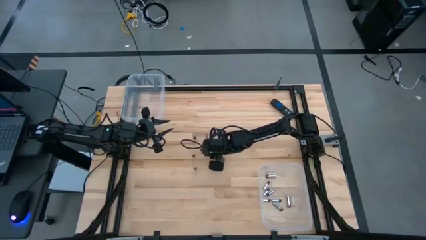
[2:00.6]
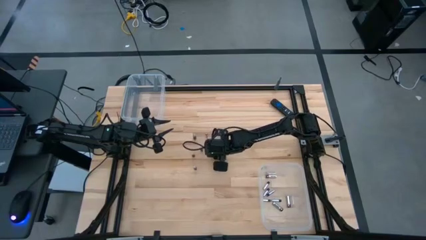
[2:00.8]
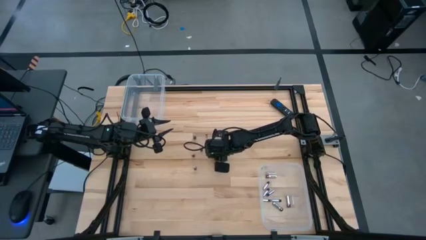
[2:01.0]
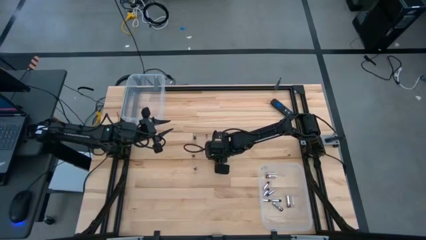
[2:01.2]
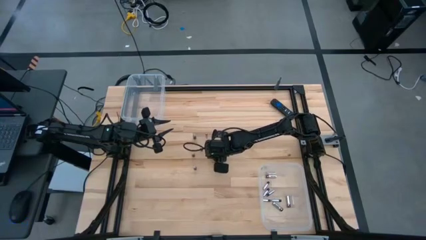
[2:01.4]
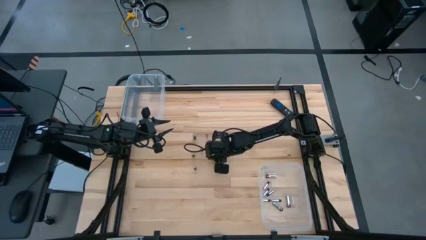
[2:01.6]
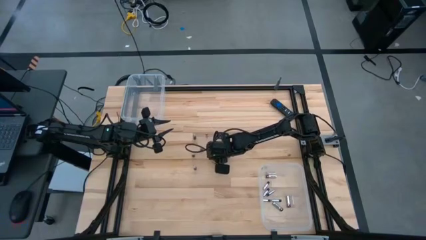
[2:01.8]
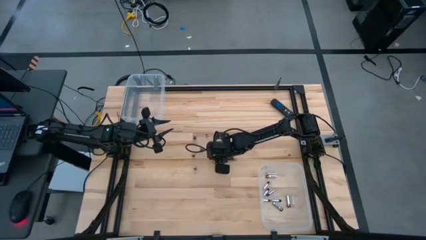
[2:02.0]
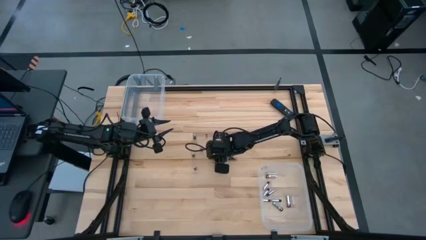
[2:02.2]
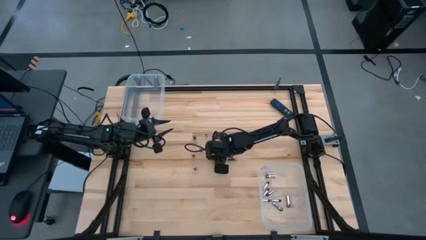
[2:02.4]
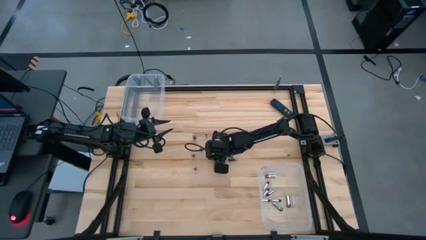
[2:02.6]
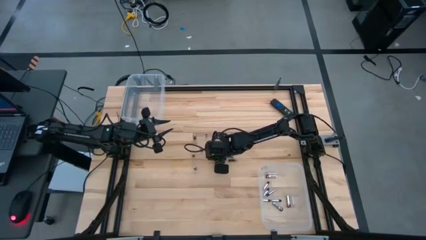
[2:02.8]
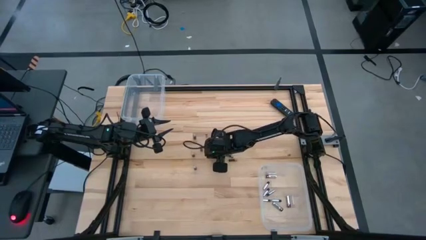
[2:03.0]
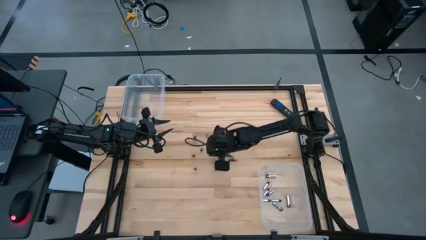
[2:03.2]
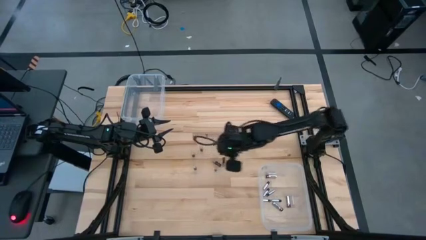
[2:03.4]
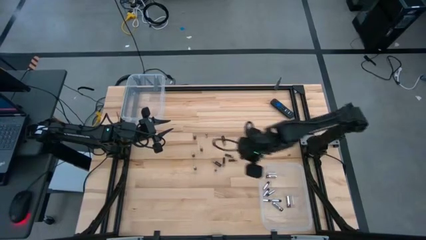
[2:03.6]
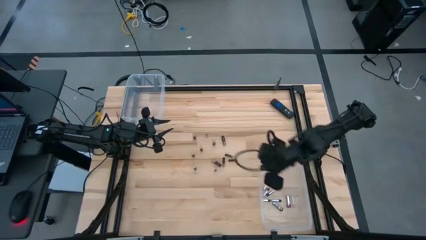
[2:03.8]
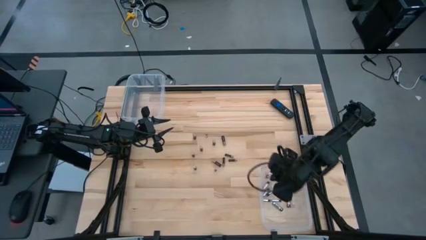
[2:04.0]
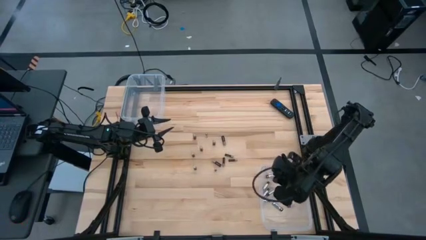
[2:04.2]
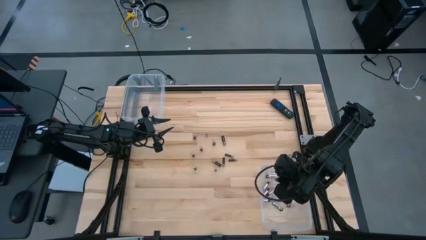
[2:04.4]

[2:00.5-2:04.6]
Task: Sort batteries
Put the black and silver battery into the bottom transparent bin

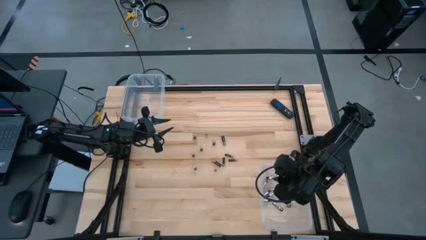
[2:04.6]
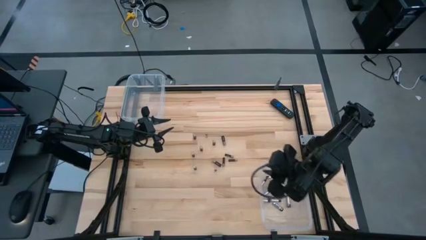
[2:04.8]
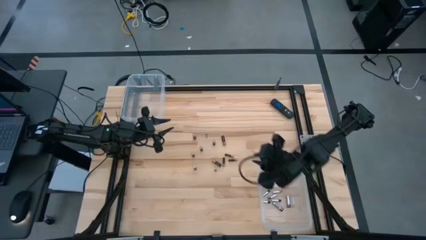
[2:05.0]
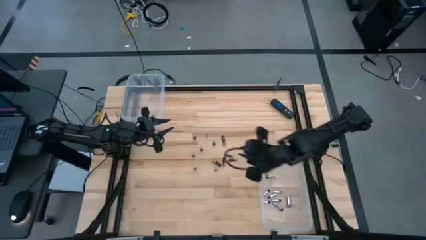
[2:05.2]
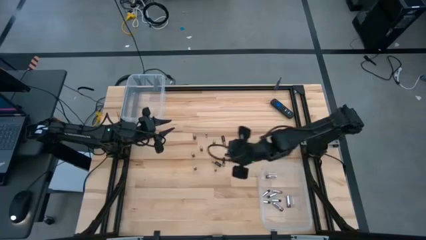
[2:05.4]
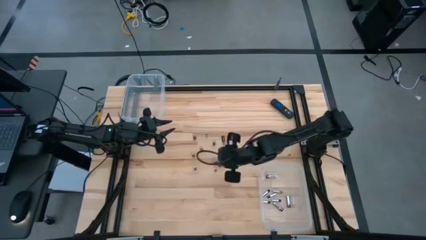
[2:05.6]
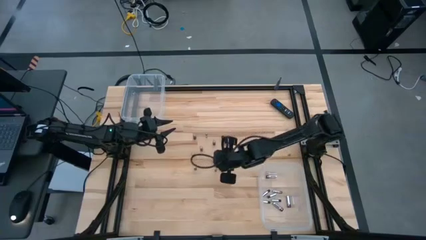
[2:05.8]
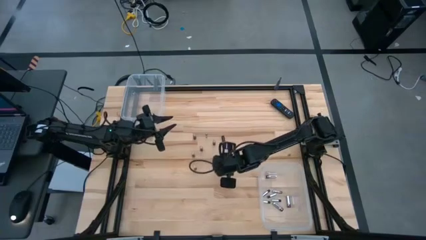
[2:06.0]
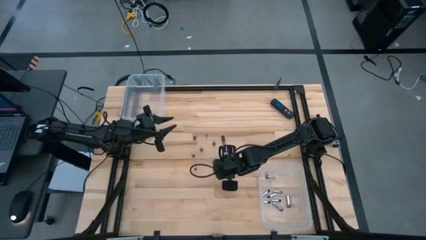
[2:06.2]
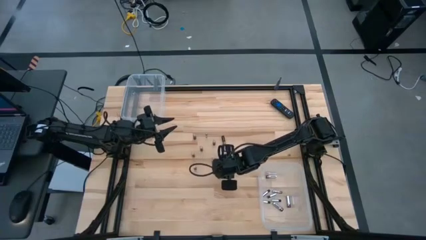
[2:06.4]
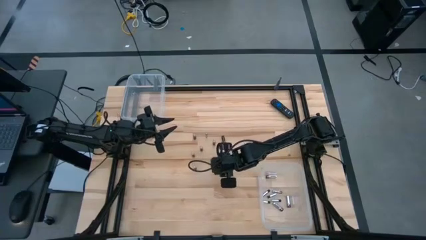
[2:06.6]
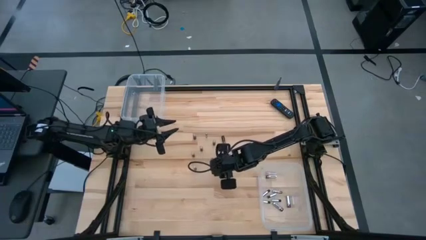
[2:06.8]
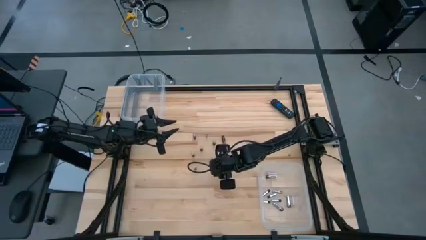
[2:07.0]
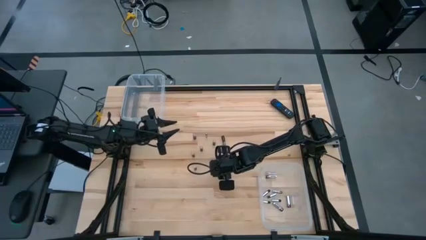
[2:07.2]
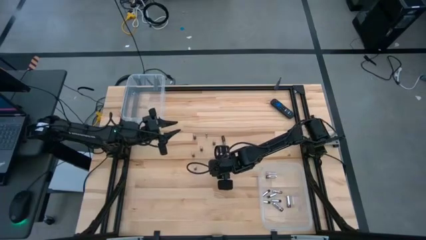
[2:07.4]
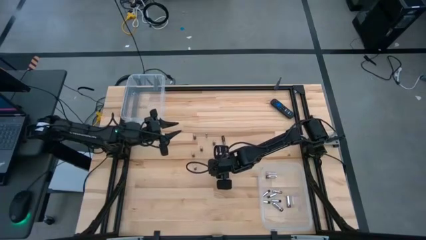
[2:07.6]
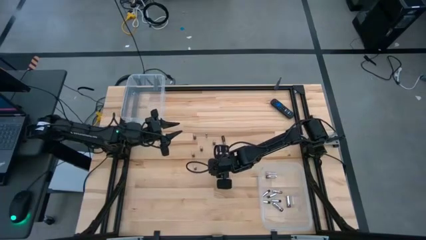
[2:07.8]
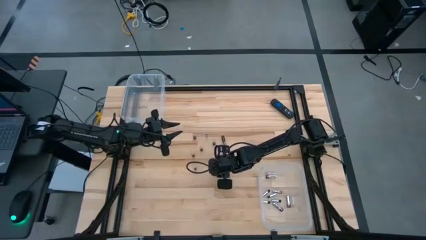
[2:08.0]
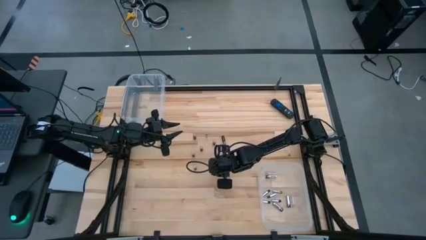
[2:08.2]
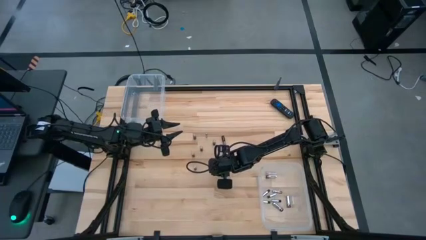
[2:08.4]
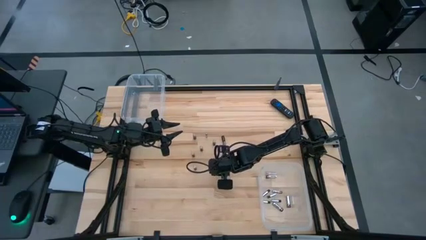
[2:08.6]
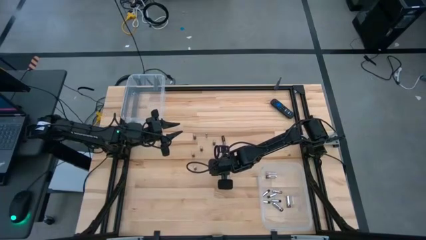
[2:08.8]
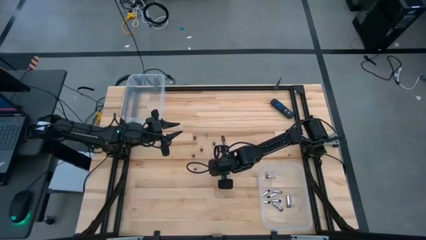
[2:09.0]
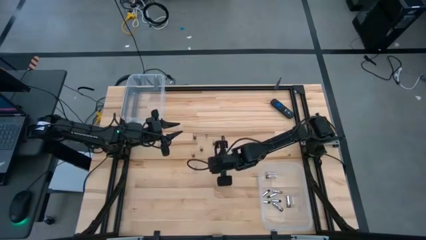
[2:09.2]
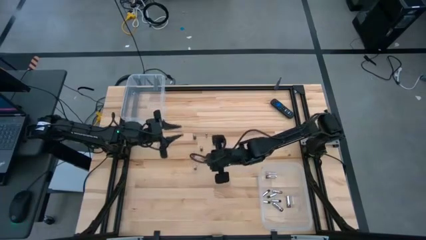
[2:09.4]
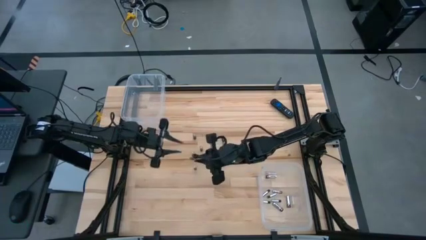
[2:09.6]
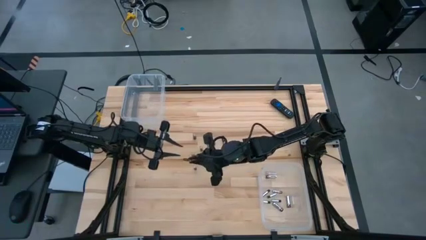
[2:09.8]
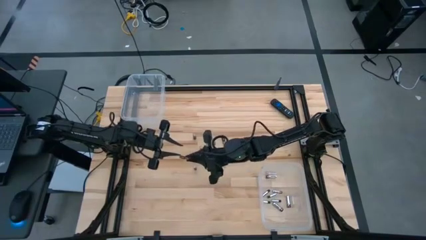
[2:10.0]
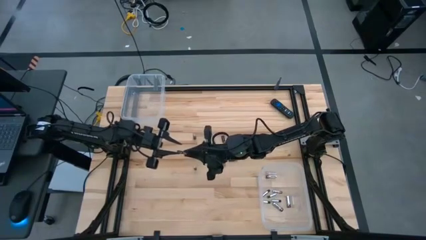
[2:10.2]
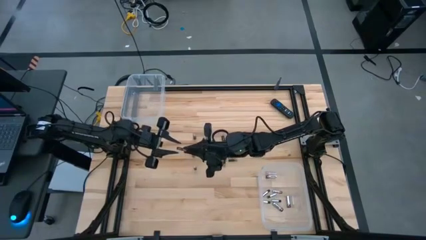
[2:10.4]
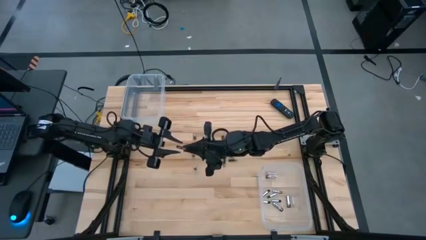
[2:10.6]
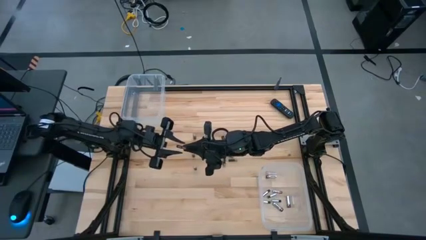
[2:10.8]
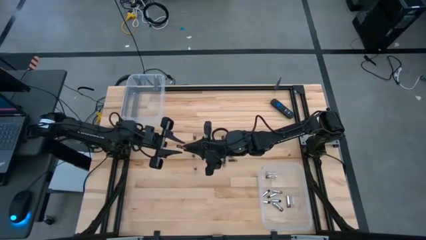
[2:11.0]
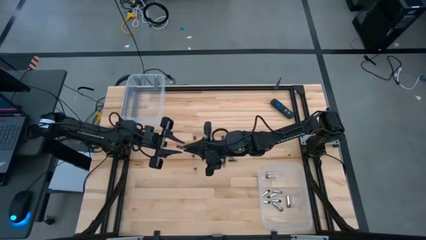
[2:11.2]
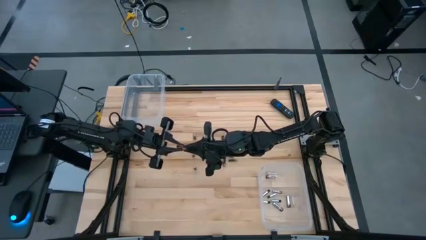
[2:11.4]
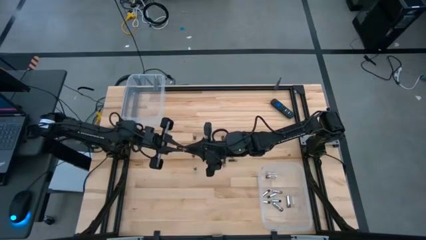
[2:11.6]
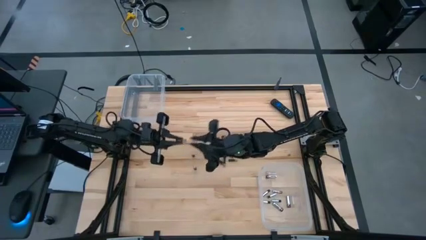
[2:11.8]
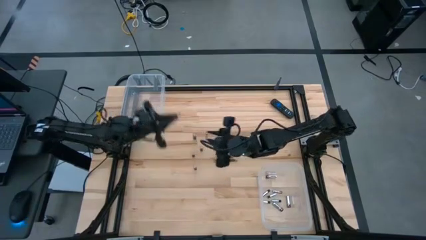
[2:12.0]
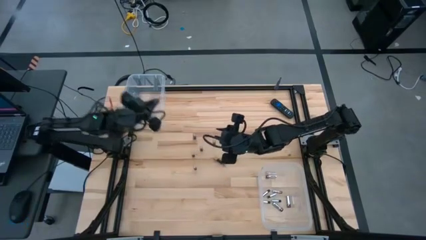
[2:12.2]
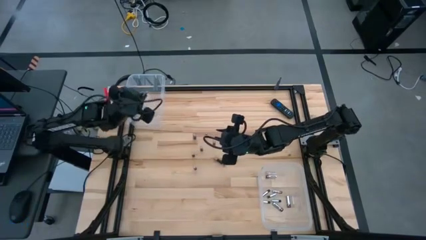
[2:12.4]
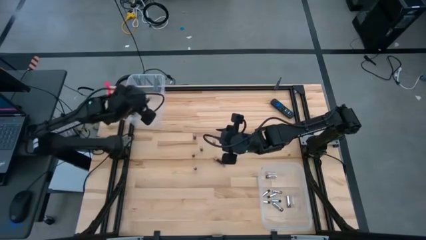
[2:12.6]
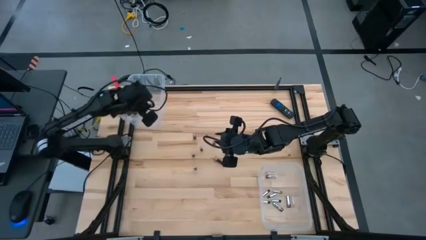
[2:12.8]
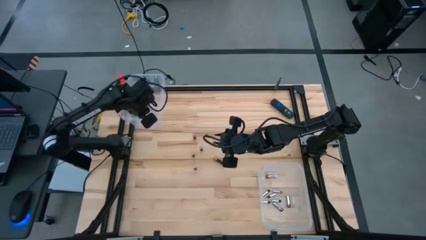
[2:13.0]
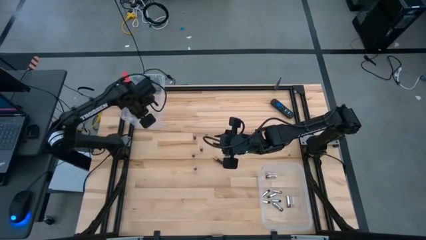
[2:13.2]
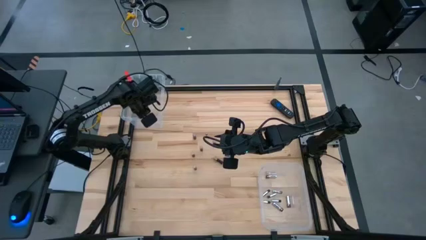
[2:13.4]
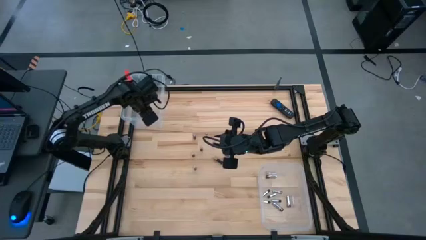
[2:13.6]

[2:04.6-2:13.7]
Put the black and copper battery into the top transparent bin
